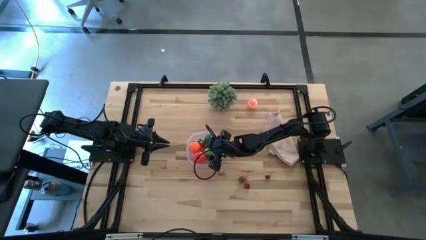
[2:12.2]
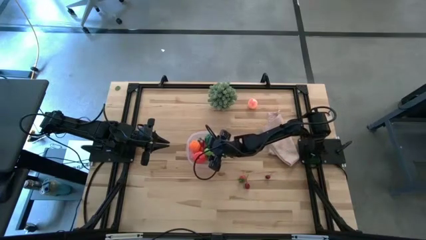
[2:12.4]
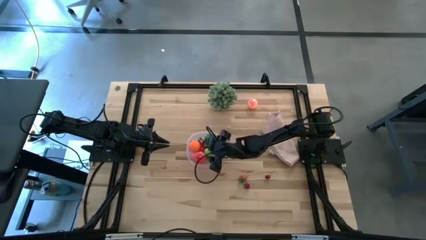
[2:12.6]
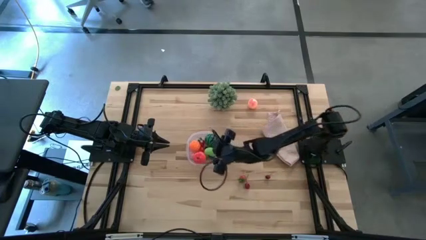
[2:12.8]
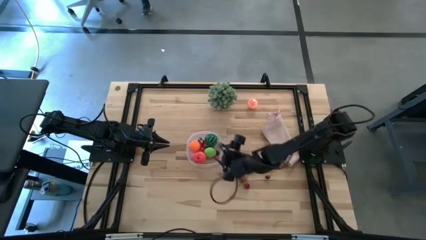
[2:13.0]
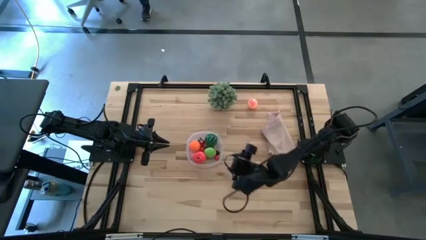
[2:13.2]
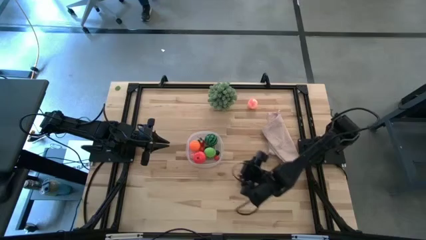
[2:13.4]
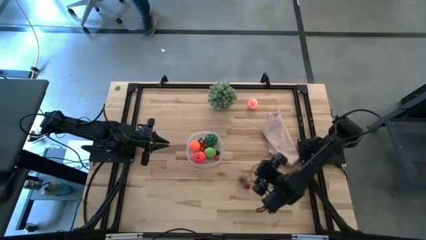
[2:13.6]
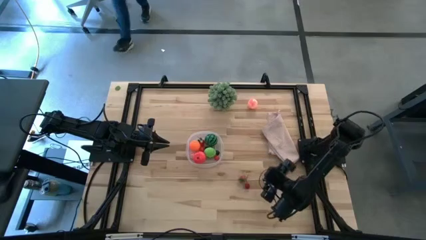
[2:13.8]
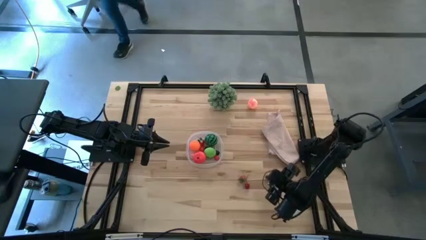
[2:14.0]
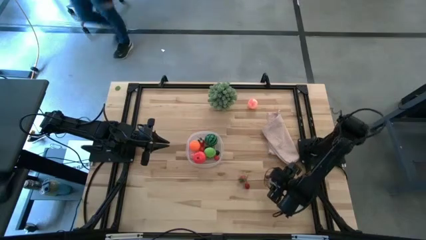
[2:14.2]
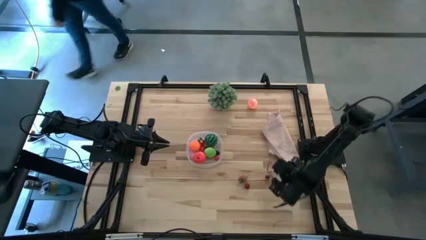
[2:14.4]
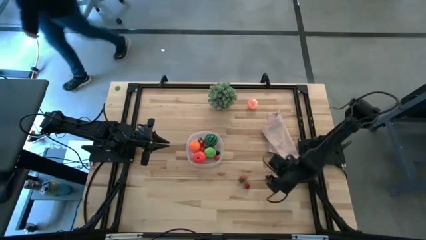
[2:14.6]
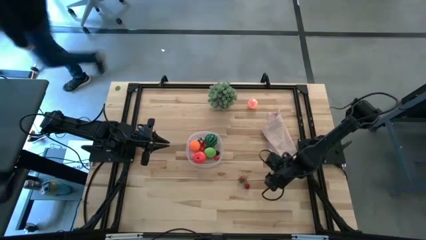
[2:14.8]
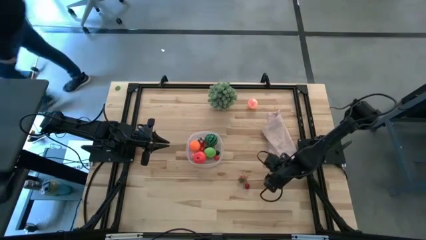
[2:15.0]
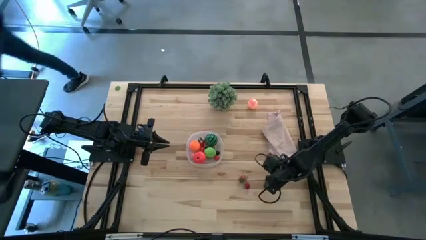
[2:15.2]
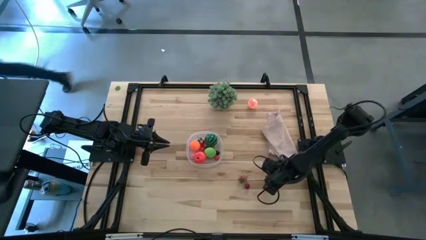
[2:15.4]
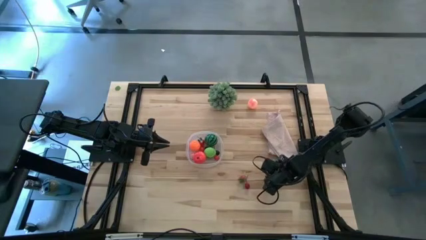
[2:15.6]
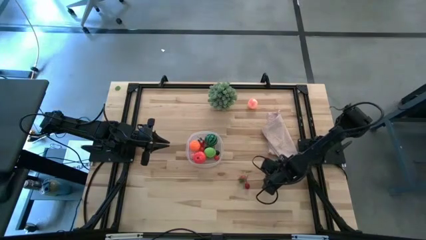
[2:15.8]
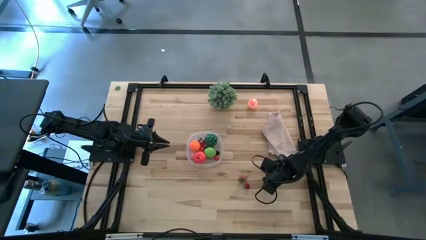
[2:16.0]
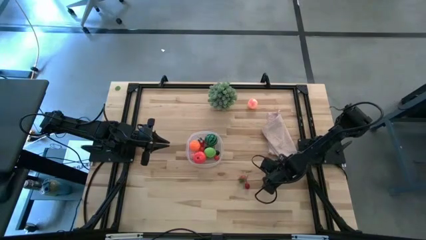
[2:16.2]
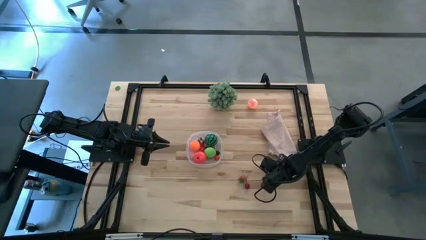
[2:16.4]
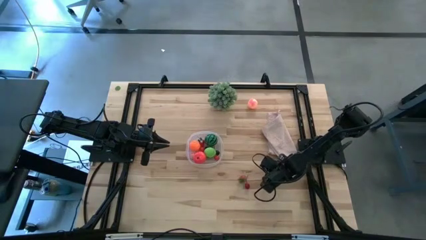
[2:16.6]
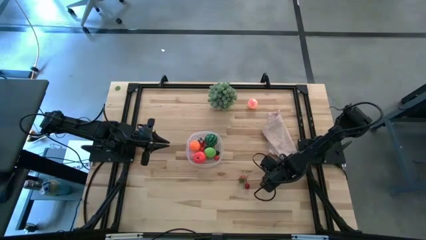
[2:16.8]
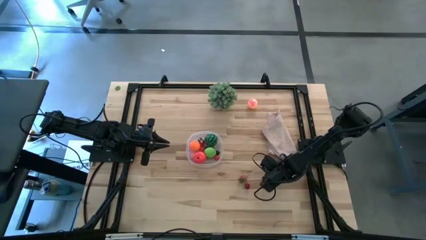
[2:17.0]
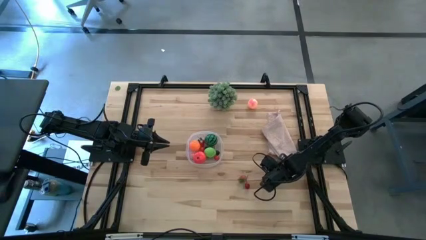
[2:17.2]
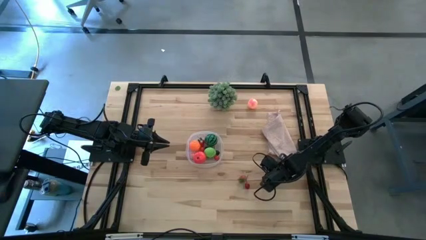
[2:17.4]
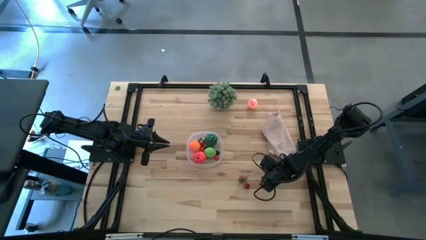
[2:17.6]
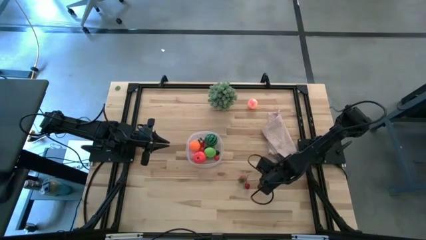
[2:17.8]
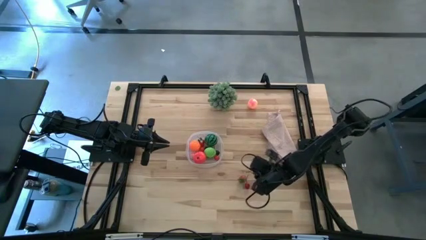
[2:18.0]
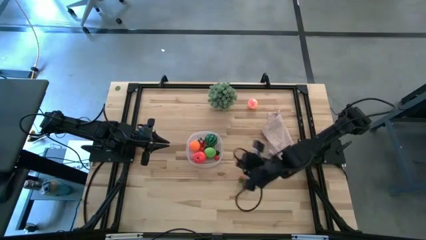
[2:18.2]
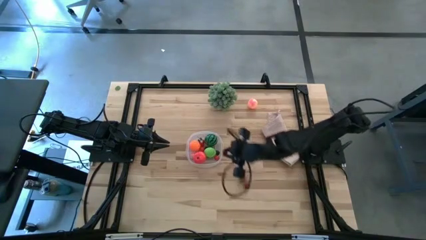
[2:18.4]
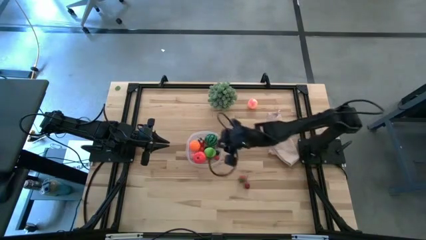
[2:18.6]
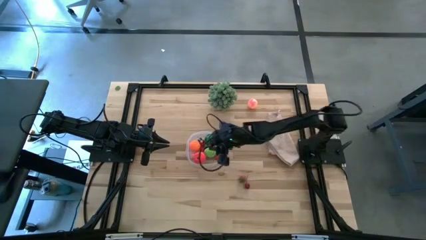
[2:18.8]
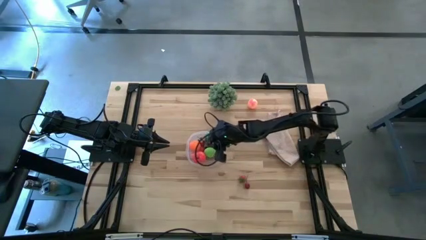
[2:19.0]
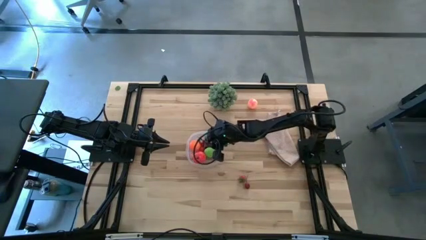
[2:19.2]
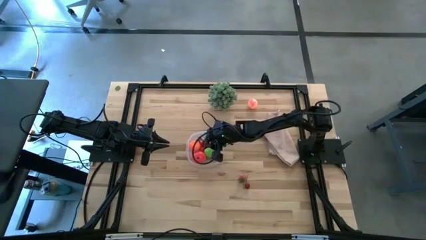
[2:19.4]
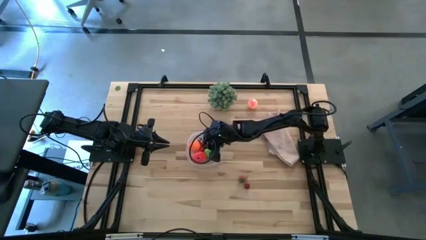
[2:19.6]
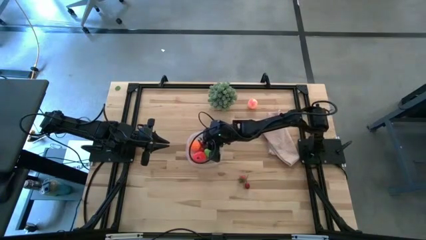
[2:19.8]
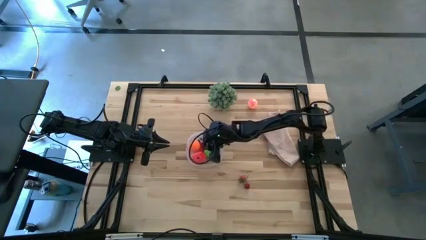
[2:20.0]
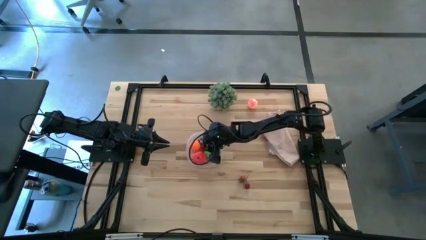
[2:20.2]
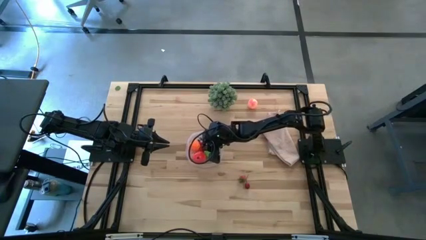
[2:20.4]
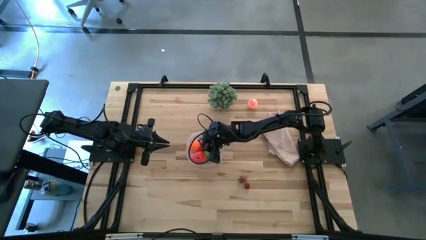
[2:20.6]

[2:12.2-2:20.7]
Task: Pick and placing Produce into tupperware
Put the right red cherry into the transparent bin

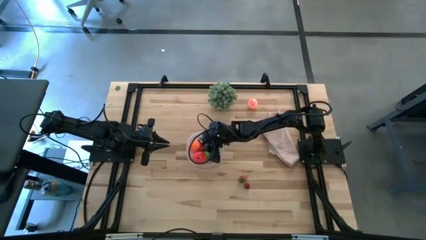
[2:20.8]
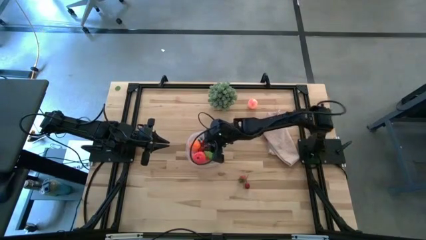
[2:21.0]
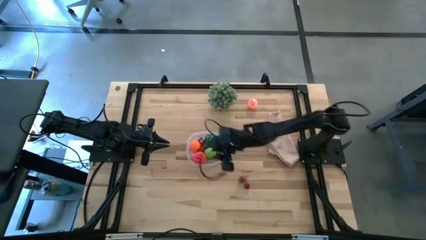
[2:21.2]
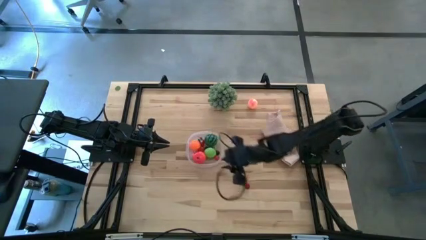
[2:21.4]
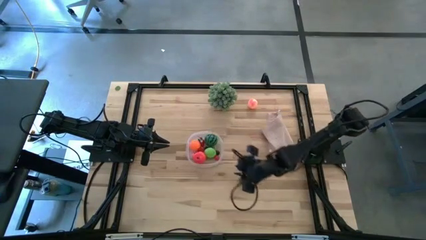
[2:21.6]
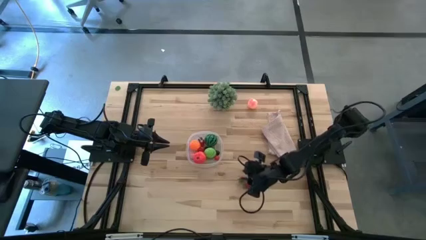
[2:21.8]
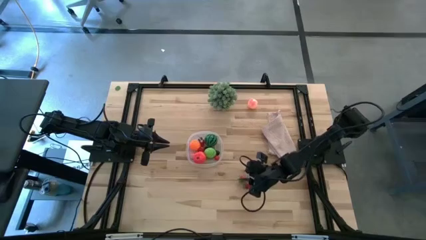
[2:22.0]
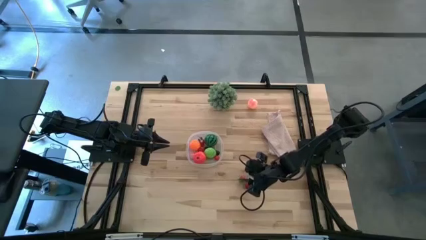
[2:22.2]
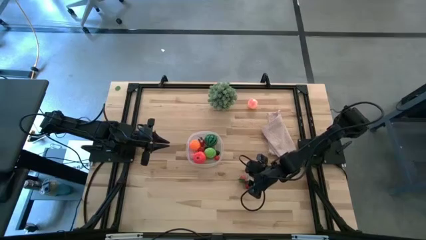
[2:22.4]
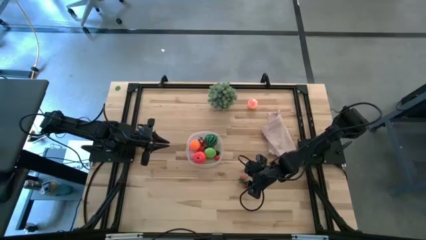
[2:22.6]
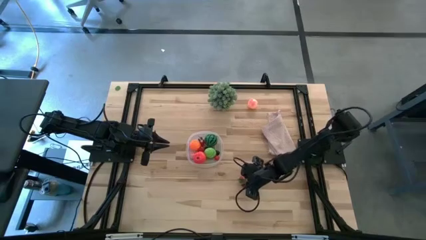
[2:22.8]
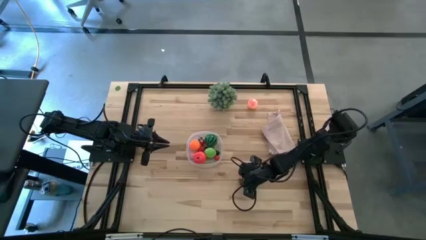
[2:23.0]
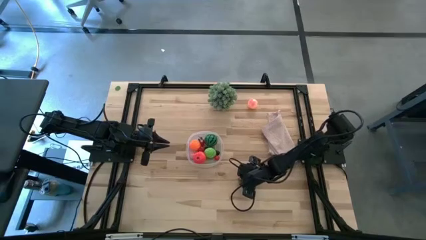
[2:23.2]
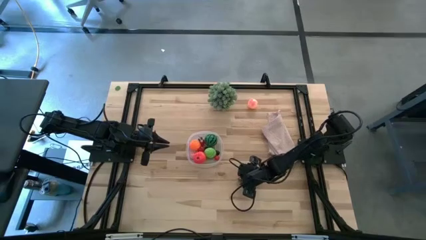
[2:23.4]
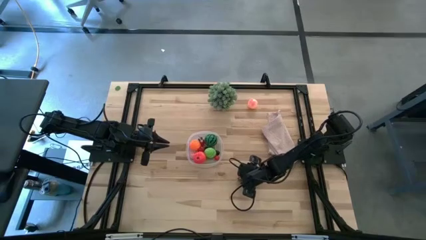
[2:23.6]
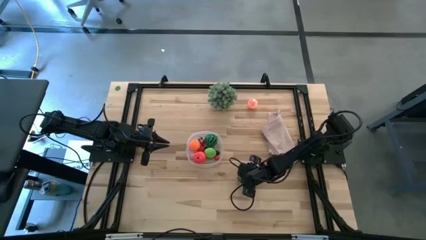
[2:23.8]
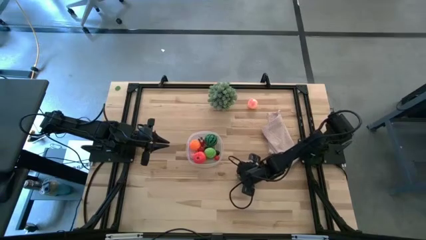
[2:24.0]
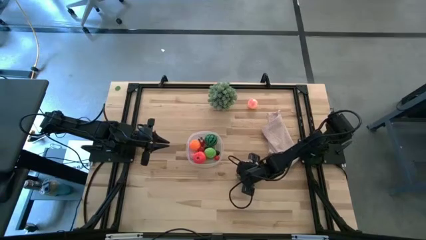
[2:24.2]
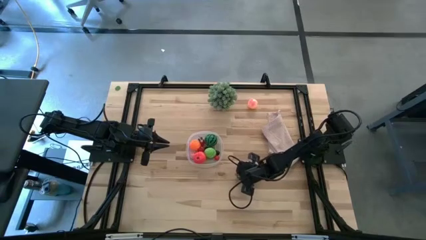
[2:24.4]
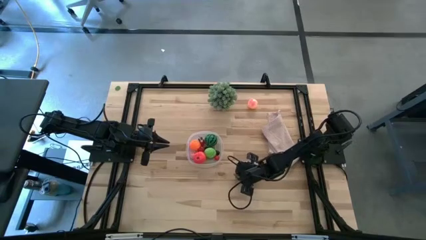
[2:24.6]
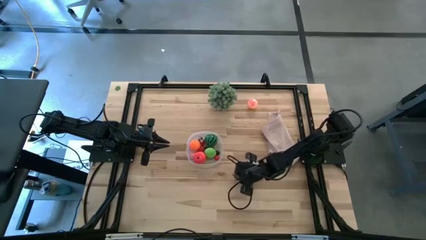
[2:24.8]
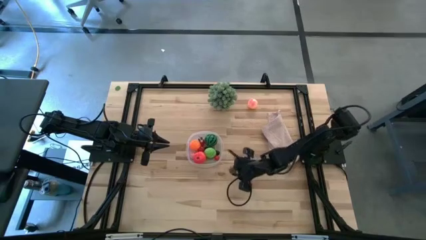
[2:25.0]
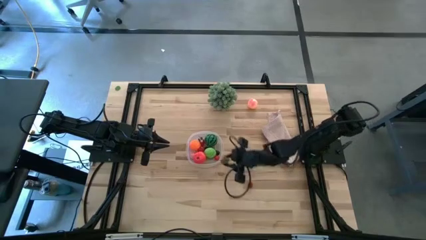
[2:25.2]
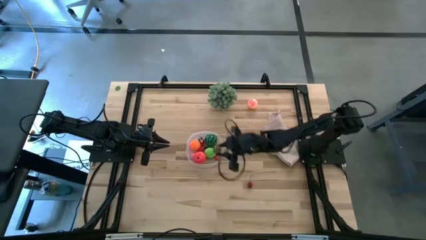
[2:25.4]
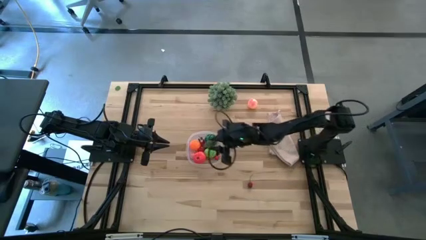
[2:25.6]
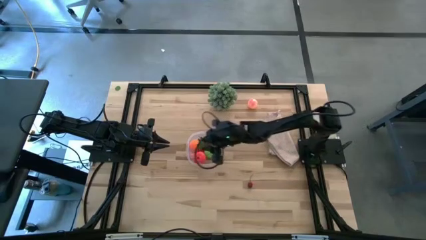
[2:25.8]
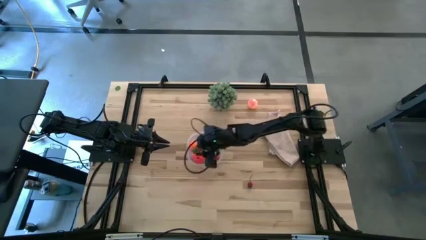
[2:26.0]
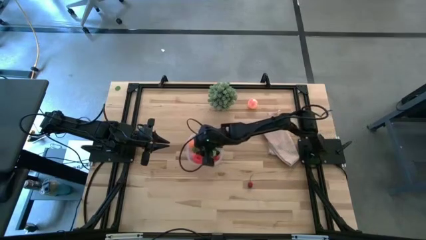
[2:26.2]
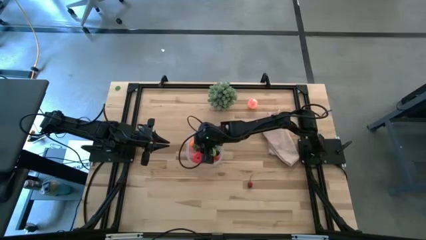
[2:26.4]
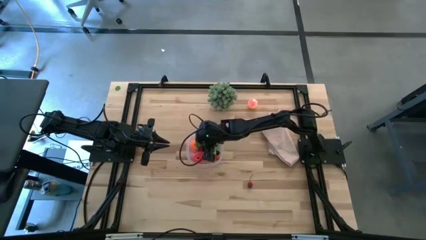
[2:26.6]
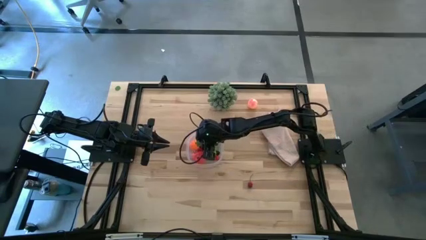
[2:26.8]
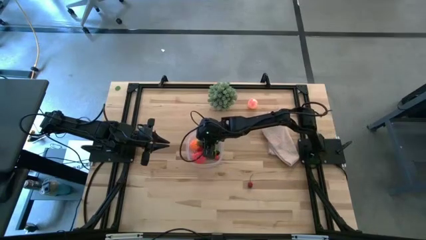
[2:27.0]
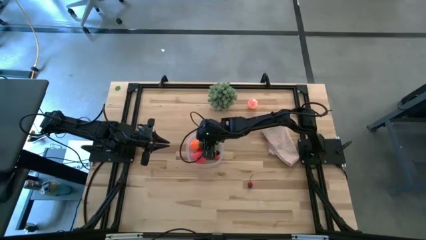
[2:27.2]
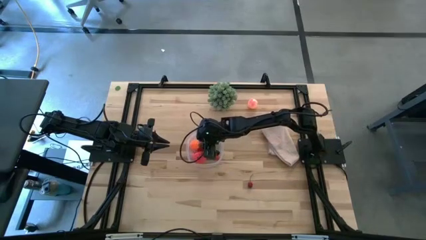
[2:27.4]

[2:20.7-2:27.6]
Put the red strawberry into the transparent bin

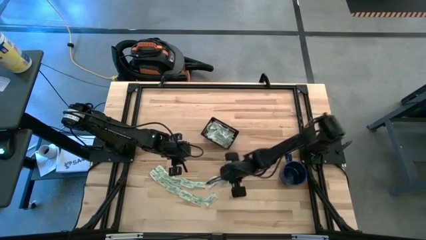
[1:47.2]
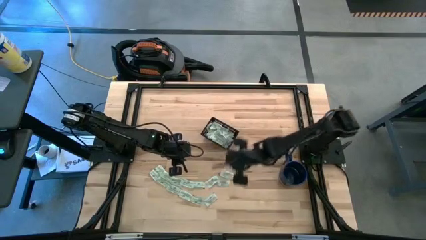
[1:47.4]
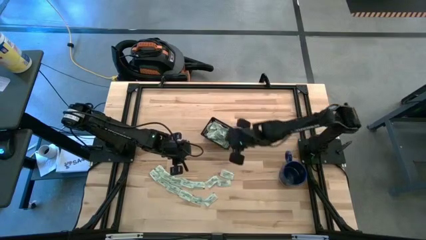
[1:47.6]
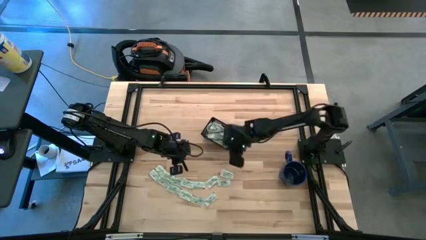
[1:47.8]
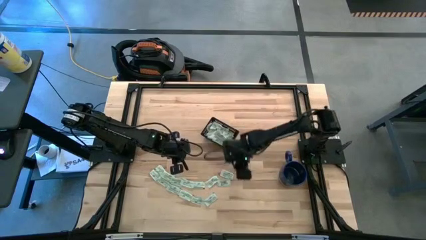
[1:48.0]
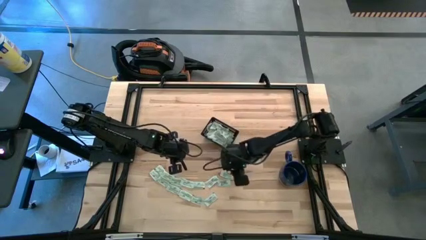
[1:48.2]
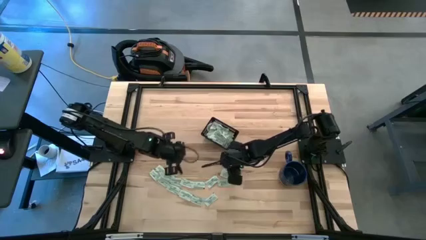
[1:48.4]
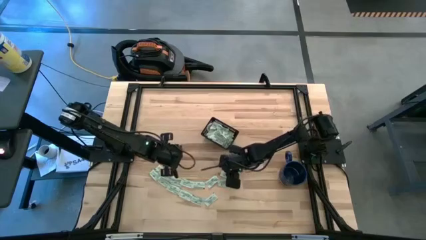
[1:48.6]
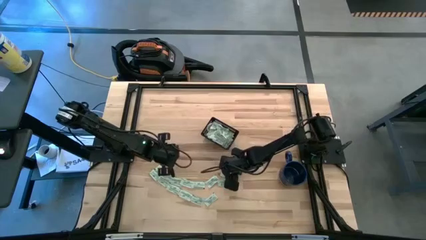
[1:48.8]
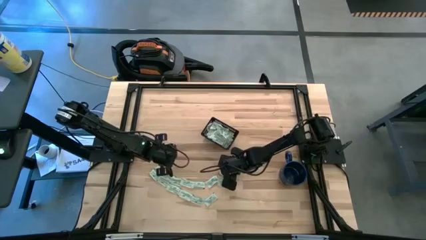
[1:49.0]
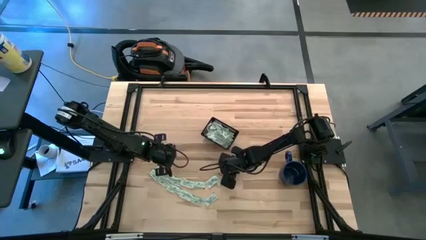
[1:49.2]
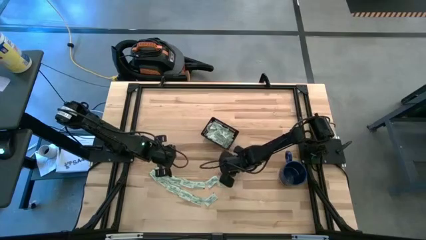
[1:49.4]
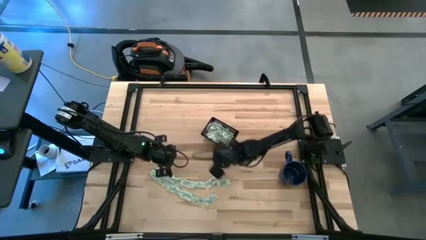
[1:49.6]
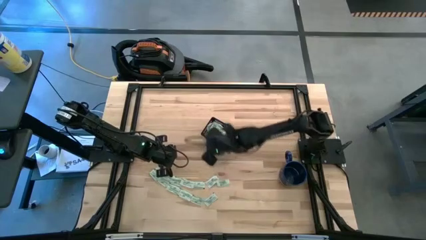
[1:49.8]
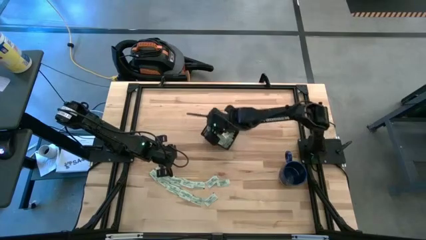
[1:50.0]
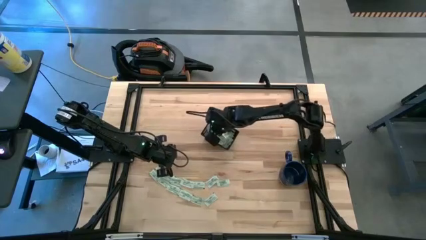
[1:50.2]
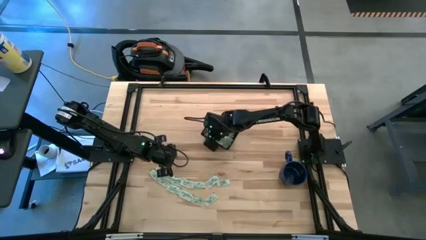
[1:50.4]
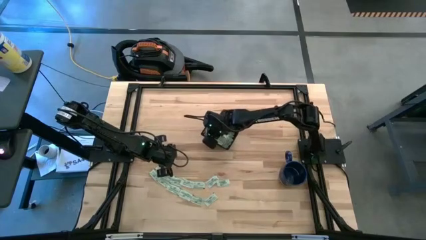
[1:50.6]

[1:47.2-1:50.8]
Task: Pick and place Stevia / Truvia into bins
Put the stevia packet into the black bin
